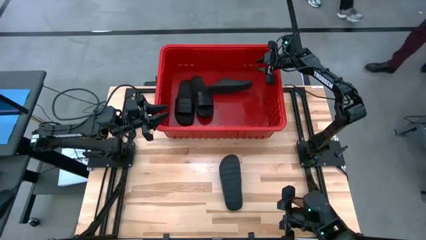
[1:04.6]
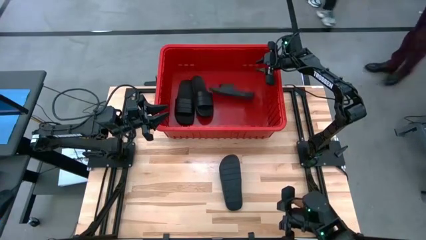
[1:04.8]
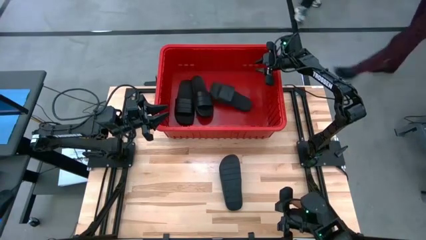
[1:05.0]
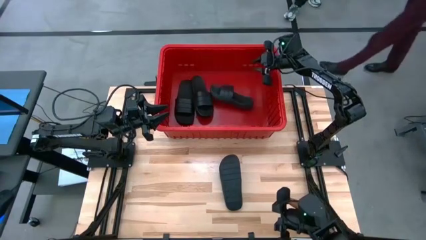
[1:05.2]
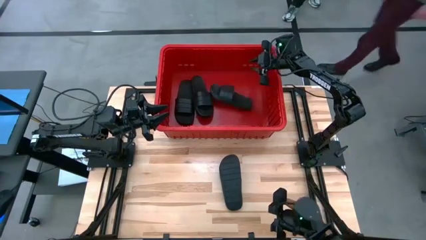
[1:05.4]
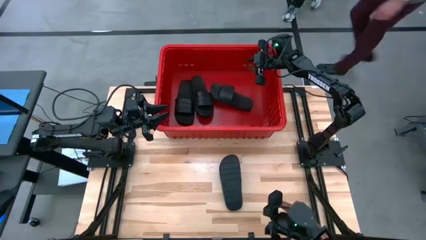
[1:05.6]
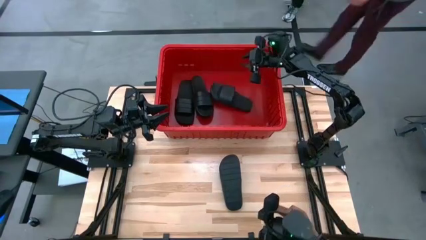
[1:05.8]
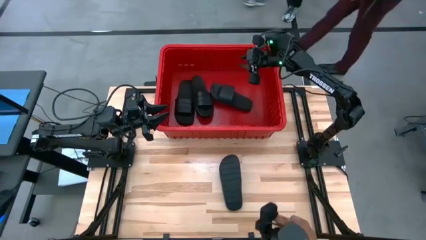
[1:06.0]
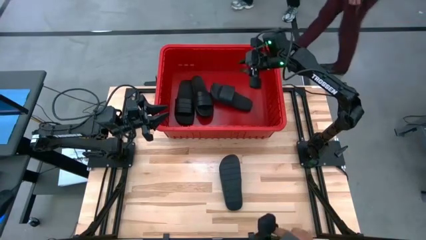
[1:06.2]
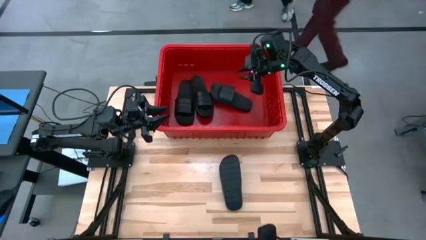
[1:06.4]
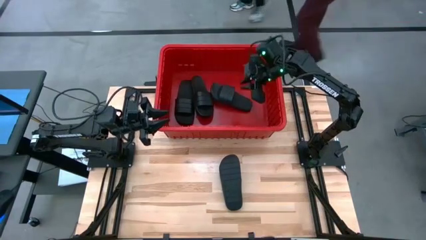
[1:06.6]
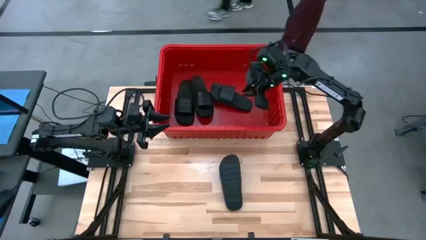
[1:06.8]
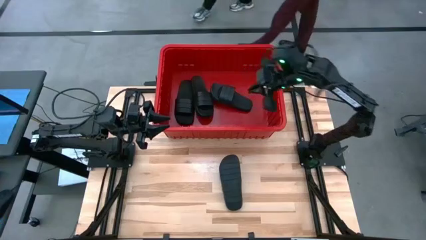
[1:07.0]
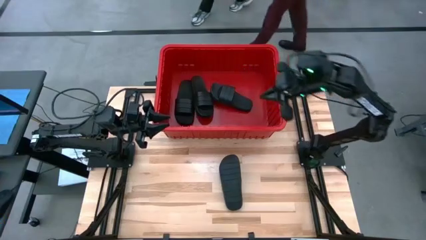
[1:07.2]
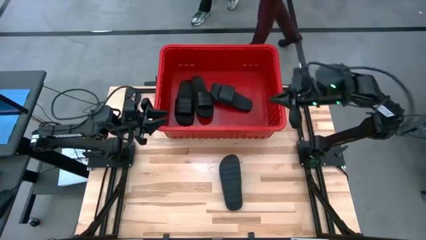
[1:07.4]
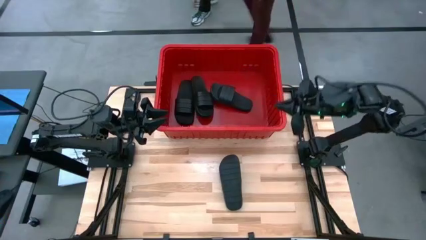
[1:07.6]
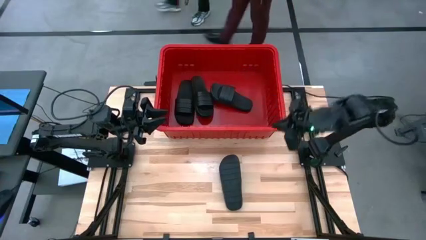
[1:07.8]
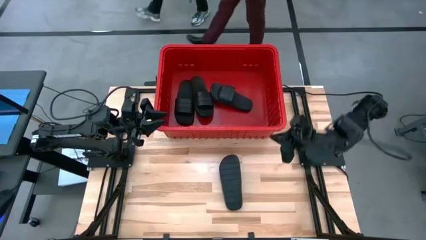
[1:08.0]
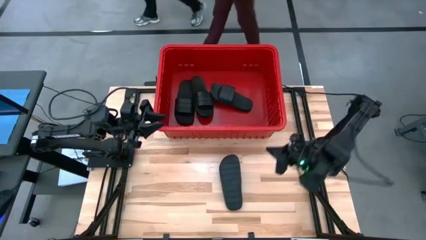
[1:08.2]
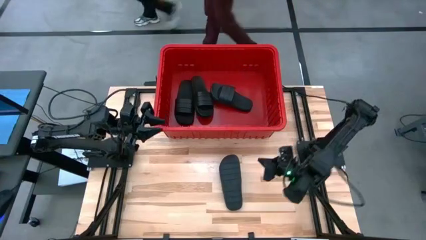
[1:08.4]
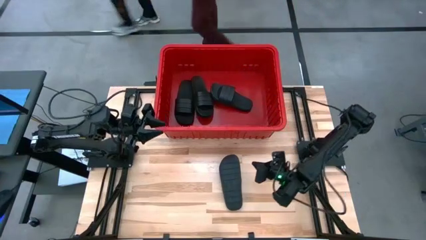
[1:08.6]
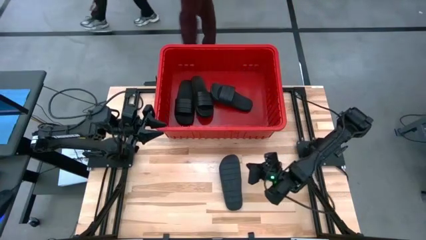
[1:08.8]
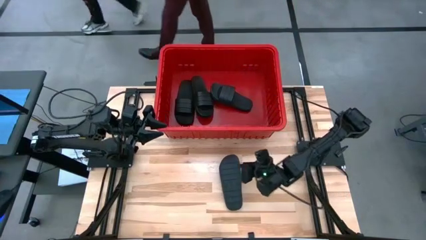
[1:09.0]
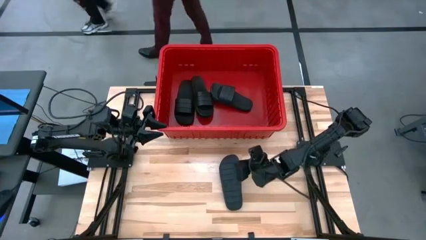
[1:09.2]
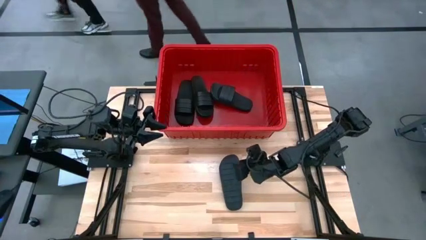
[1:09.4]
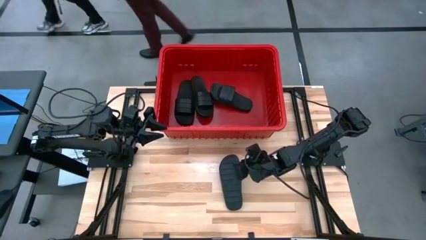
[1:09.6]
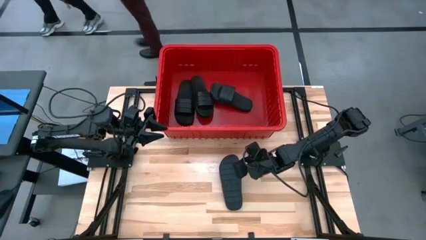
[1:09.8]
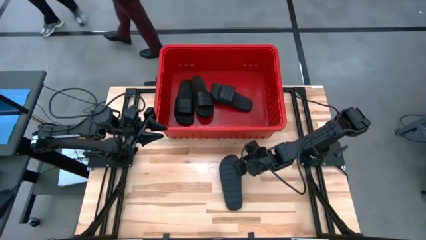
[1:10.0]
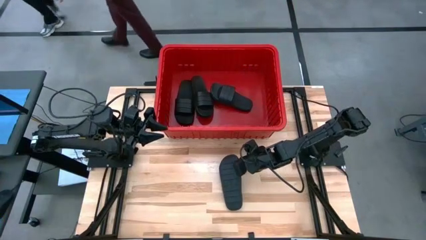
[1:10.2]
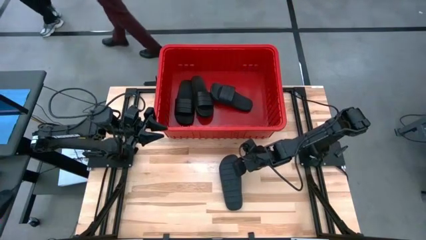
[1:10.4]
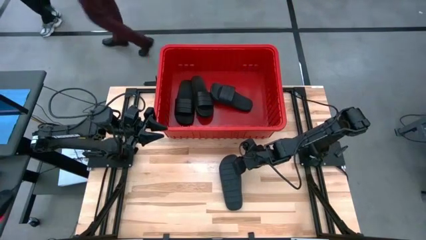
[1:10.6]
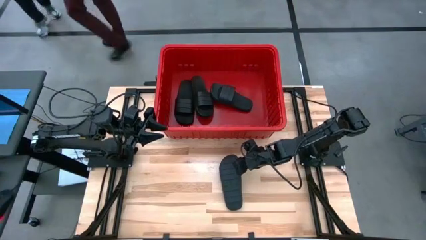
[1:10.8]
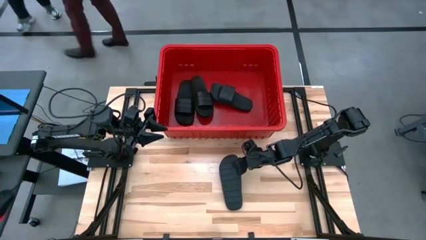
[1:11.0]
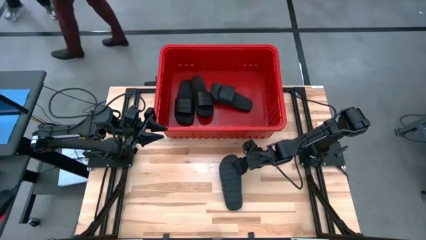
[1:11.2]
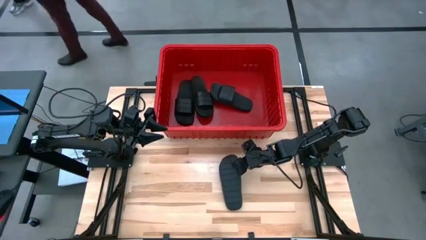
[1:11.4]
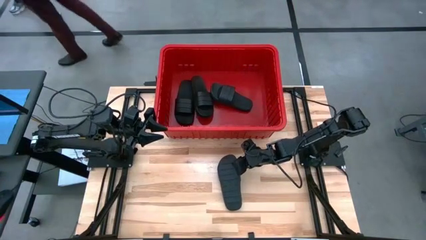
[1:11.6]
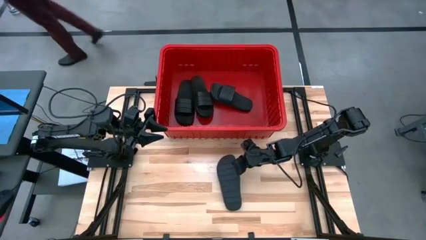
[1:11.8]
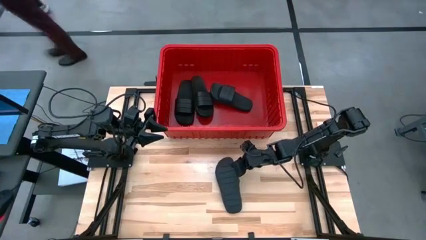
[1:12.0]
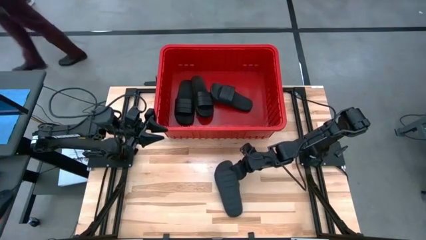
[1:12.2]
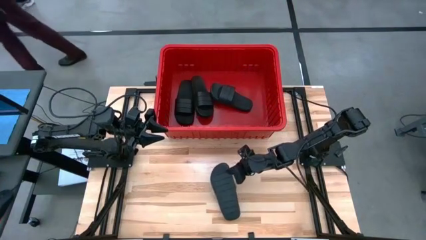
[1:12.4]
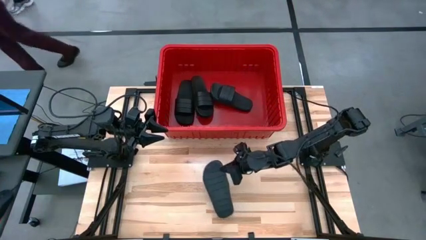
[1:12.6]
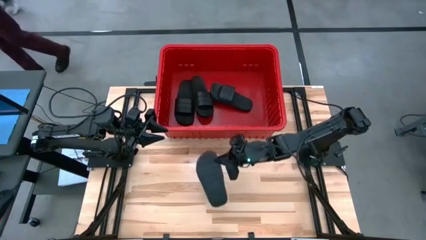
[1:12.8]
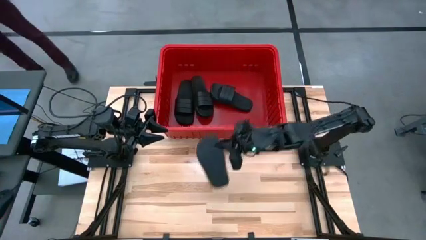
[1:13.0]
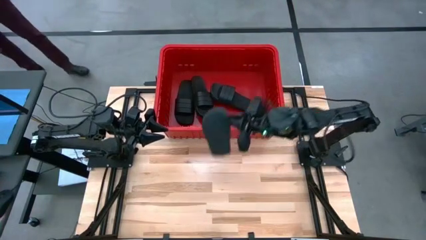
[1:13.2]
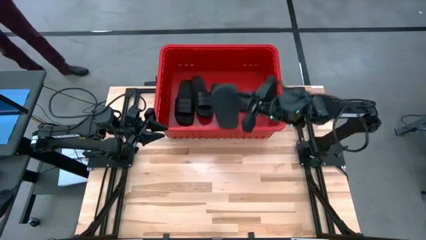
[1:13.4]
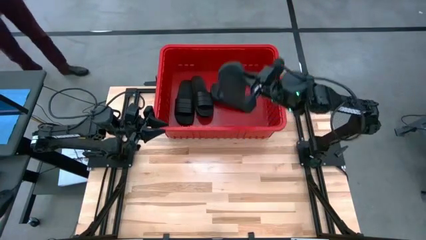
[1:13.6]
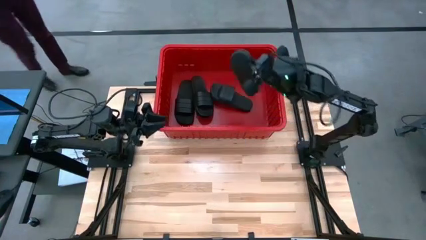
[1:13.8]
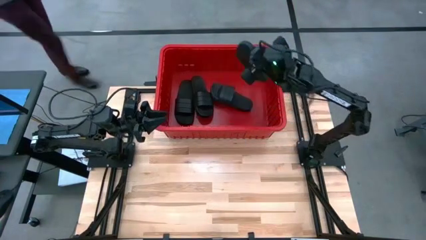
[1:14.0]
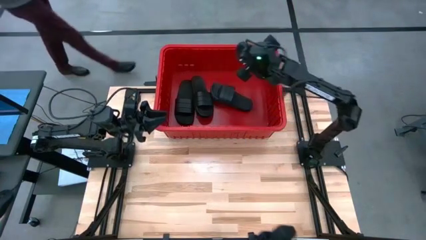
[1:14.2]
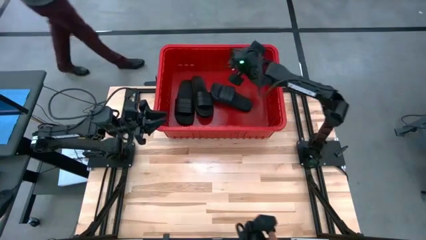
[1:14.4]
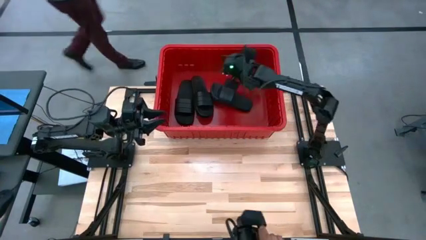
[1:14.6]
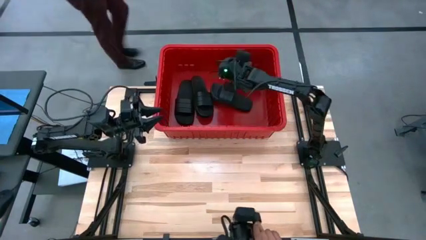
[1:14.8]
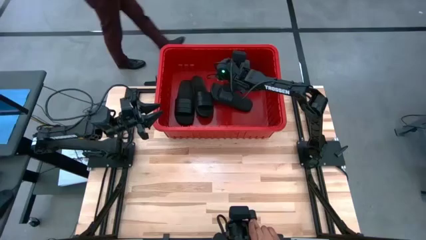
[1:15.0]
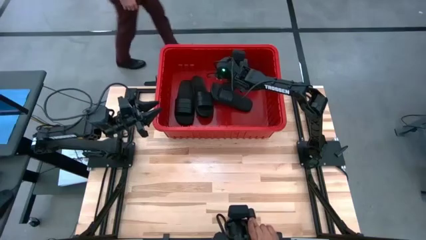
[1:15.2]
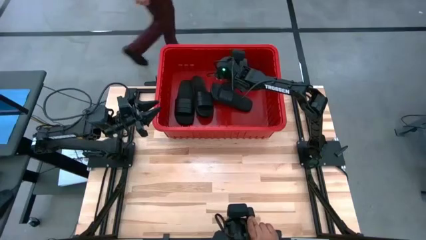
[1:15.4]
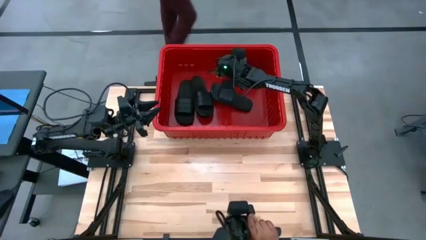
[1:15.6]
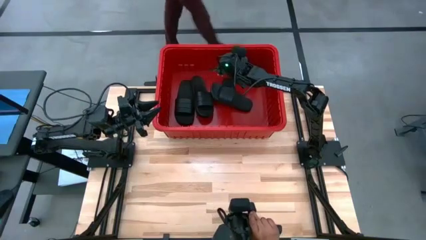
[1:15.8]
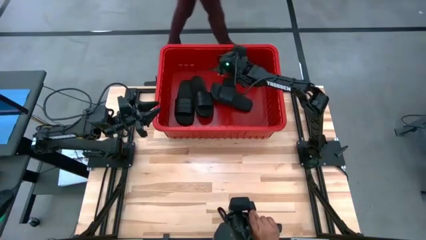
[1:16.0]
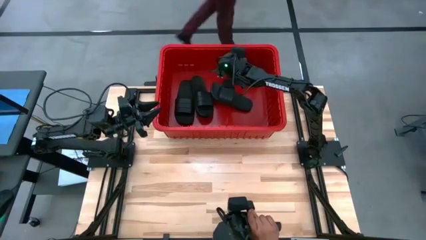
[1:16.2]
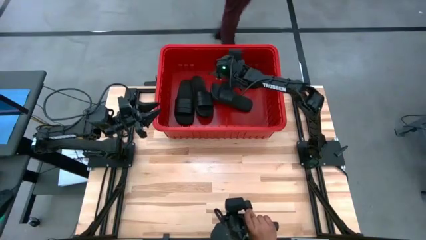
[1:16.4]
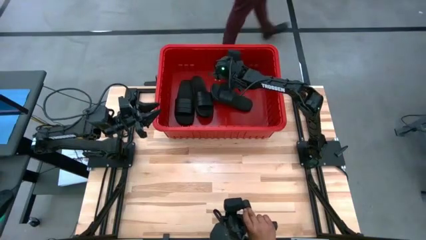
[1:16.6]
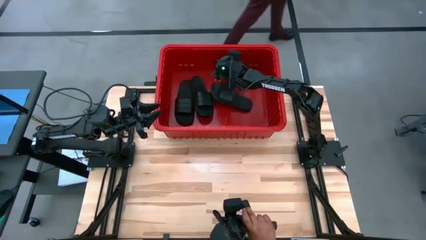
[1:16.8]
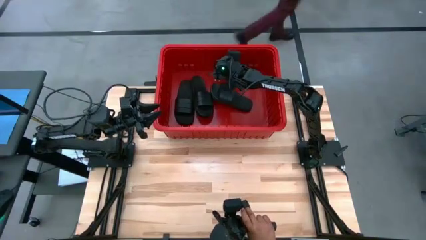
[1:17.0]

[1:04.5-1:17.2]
Task: Pick and place slides into bin
Put the black slide into the red bin
